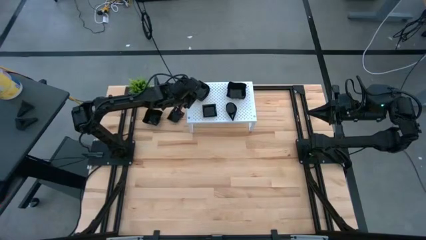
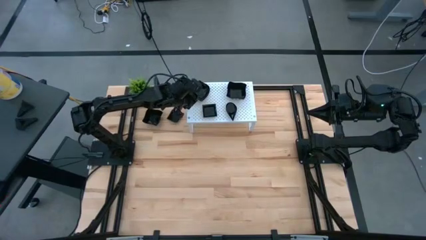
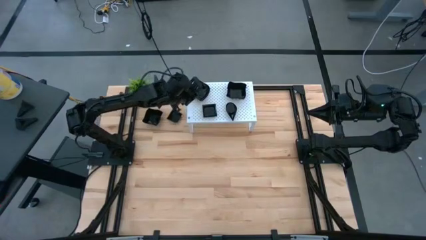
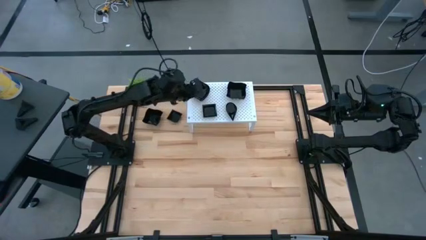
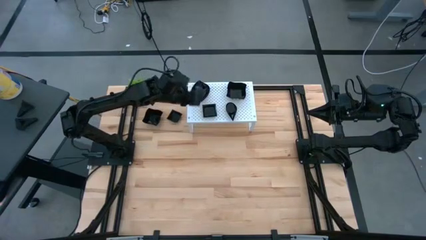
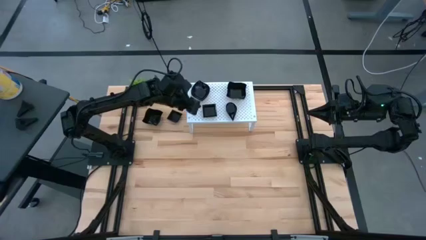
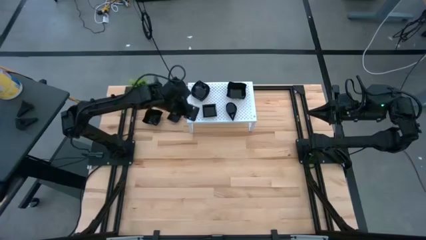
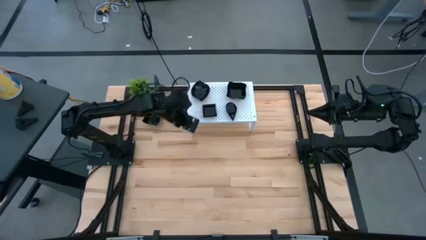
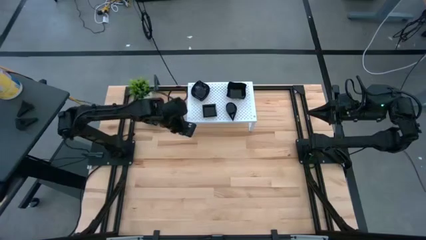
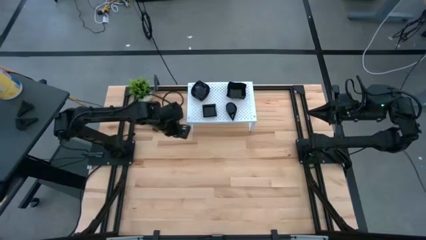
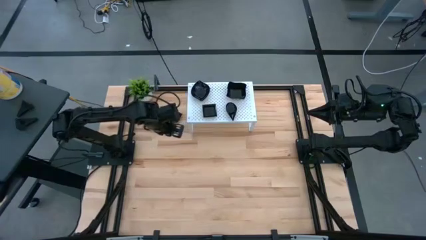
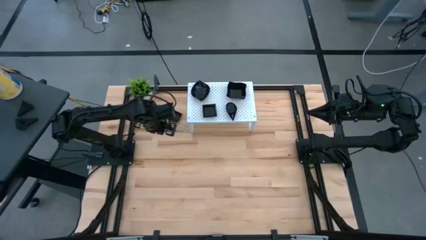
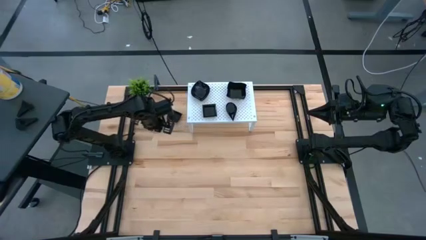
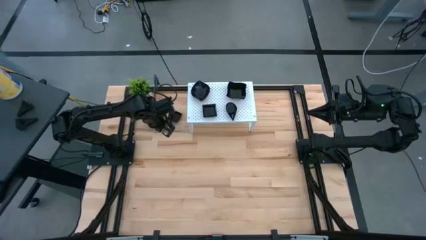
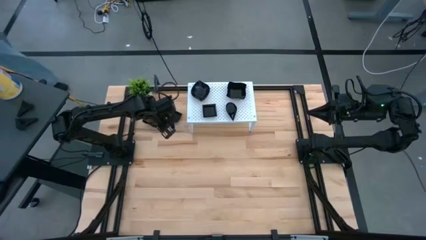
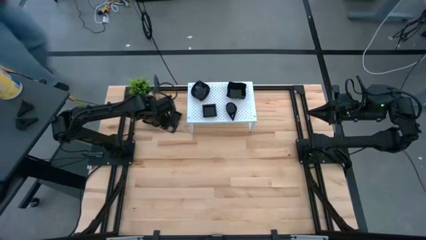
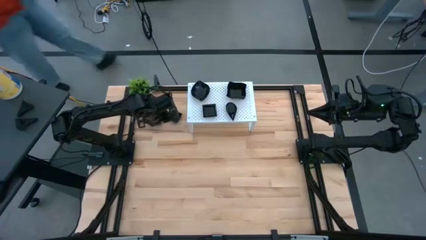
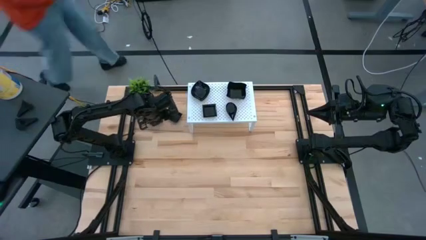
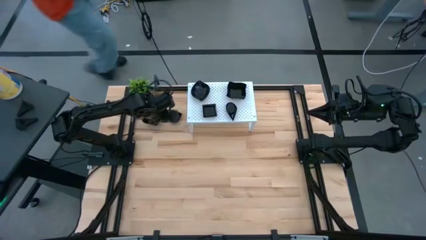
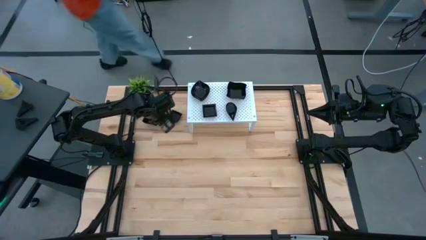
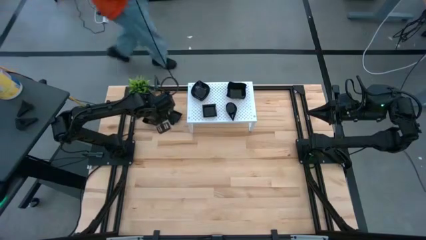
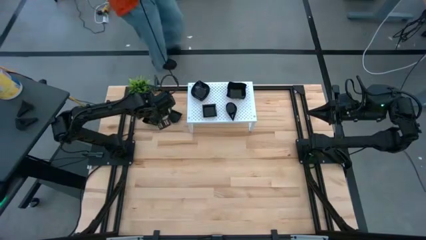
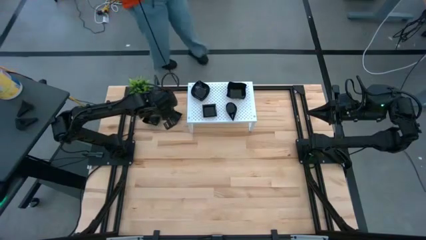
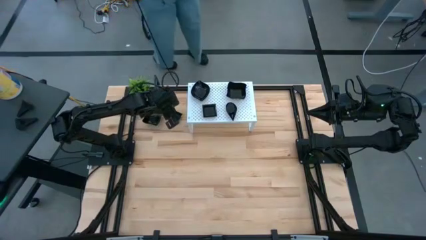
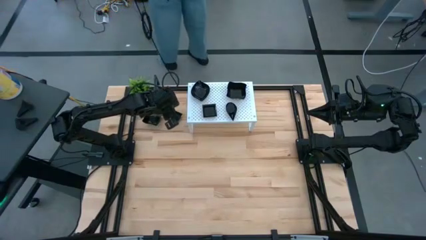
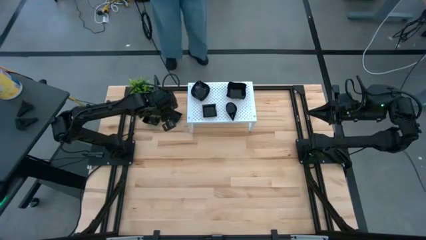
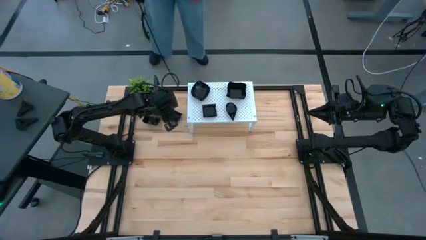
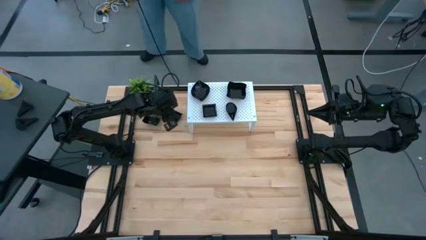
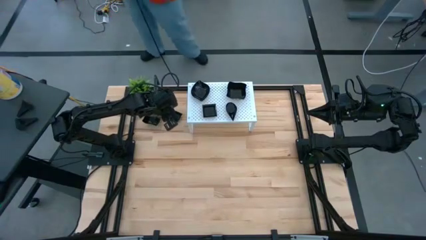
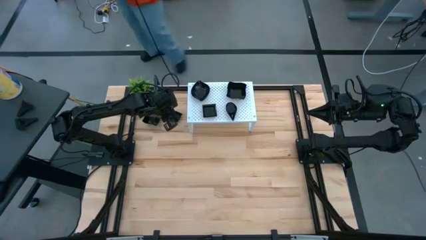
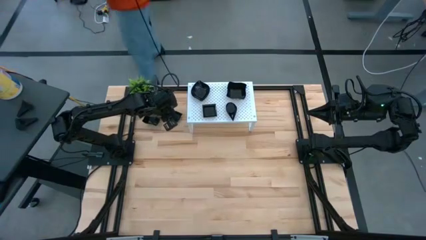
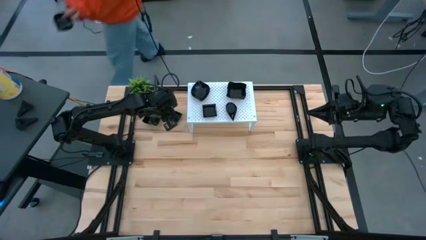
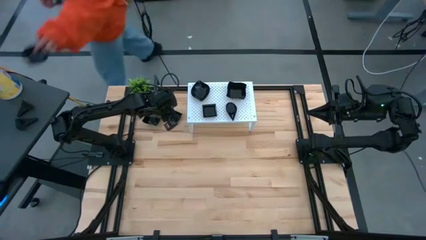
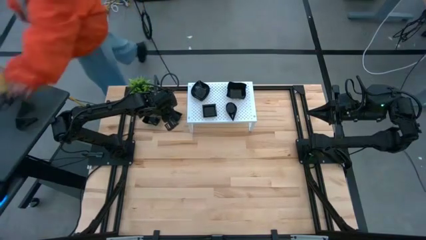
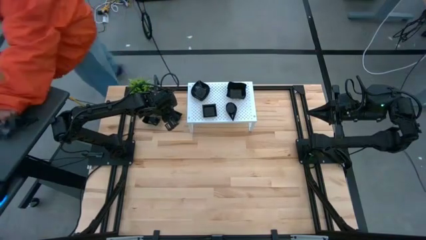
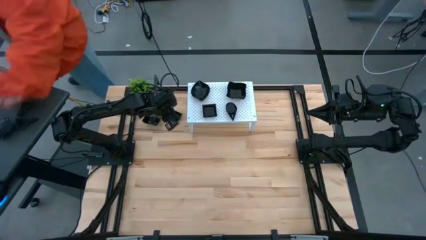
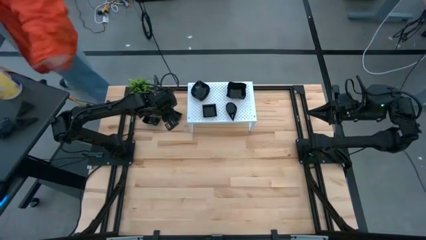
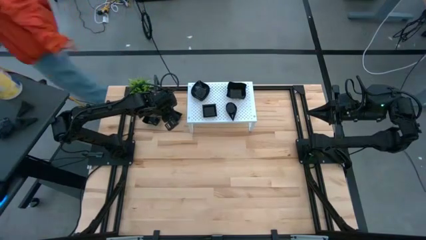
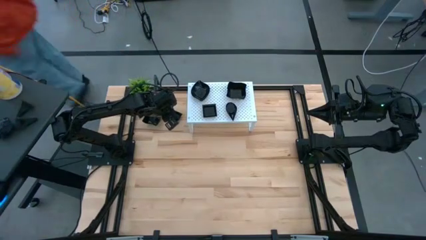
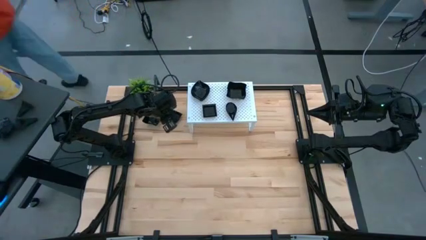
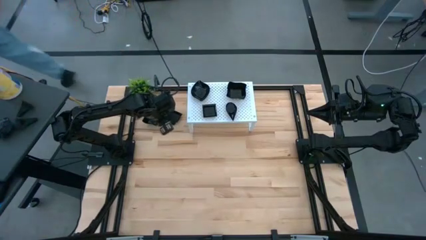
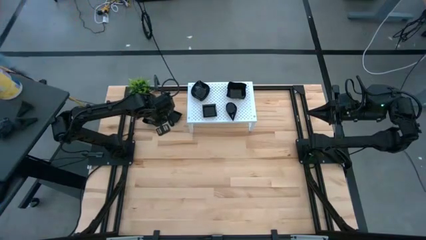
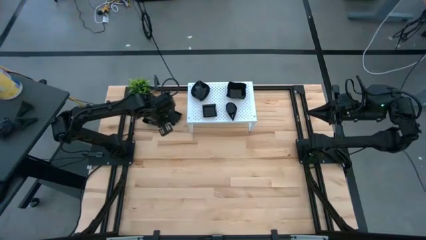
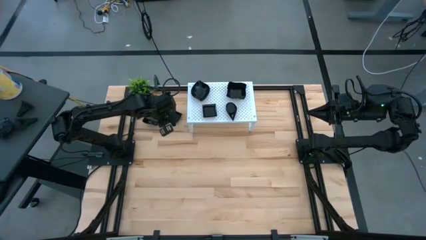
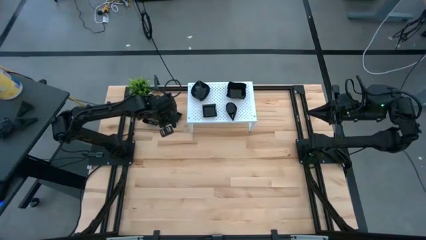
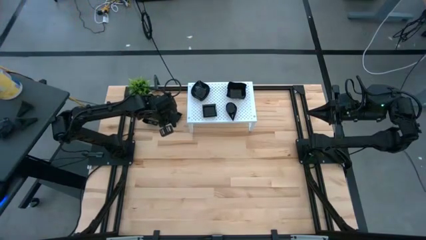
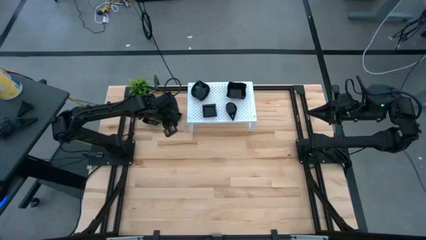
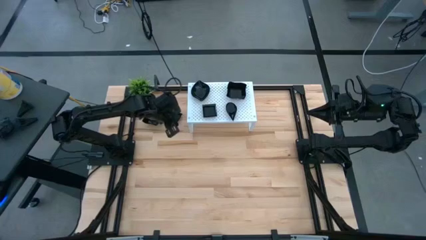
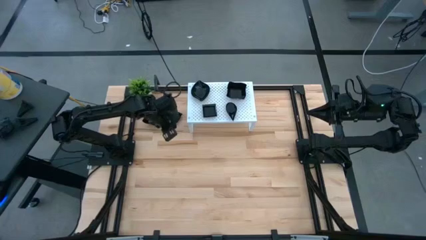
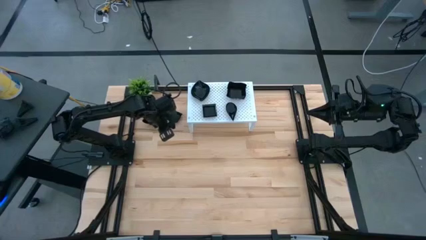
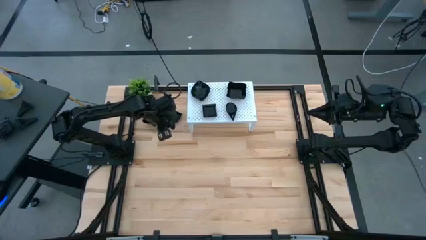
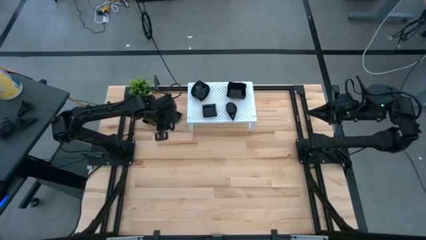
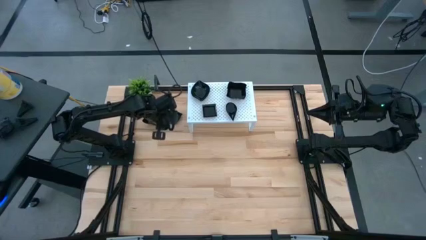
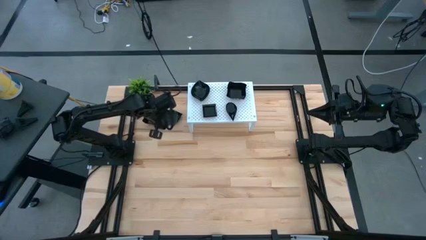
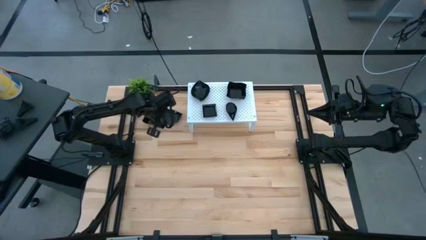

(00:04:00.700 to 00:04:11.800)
Task: Pick & Place Mini shaped plates
Stack the square plate on top of the square plate on the shelf

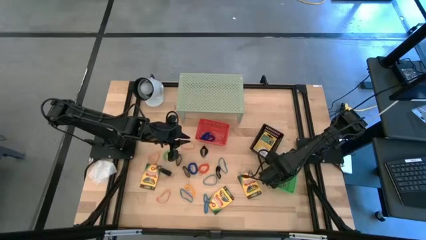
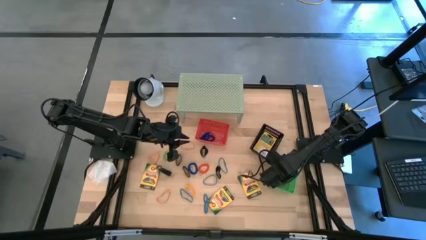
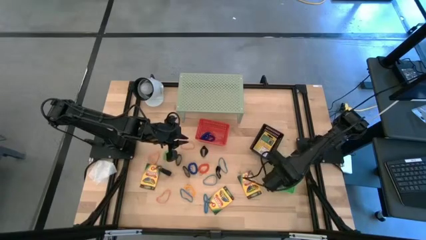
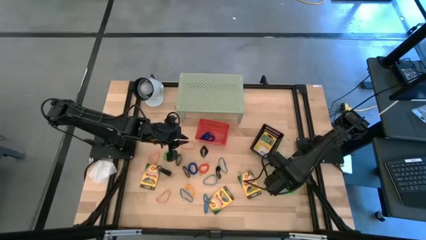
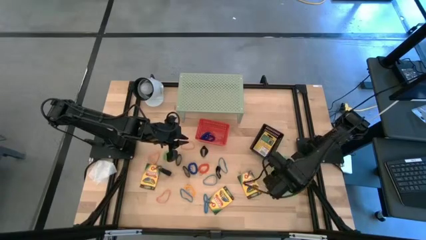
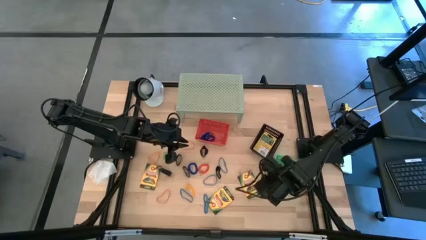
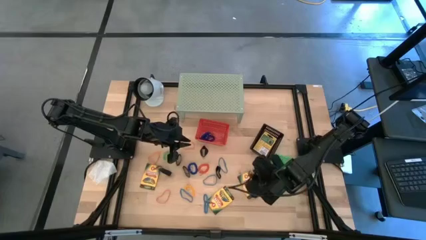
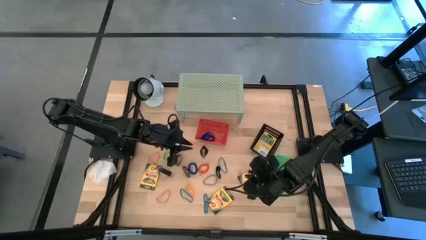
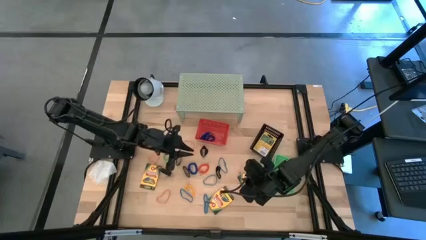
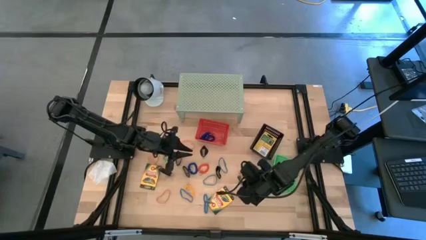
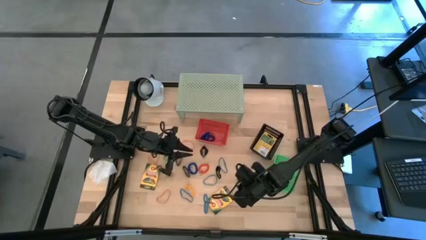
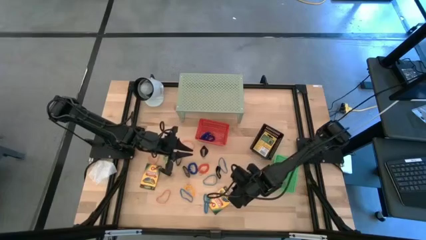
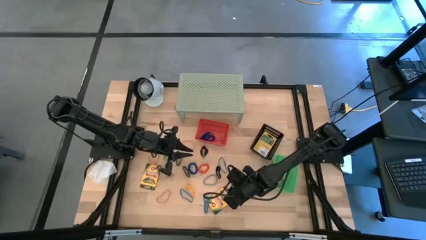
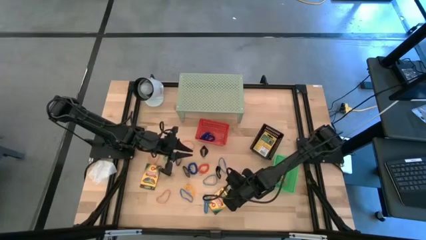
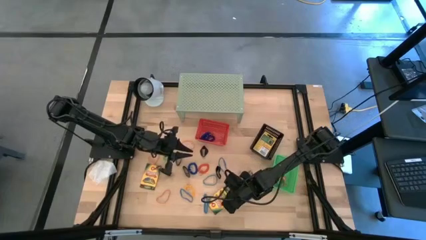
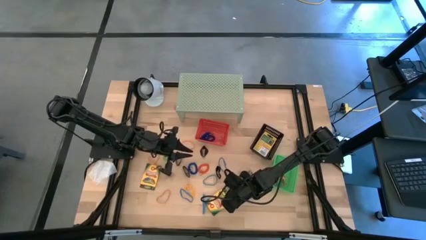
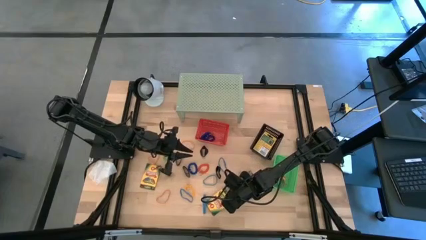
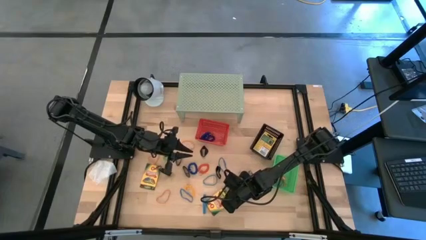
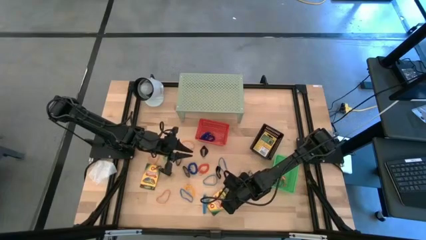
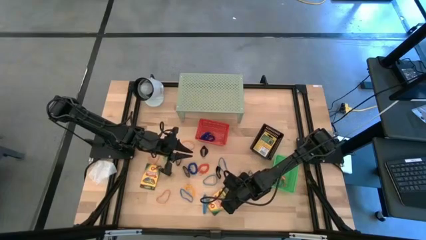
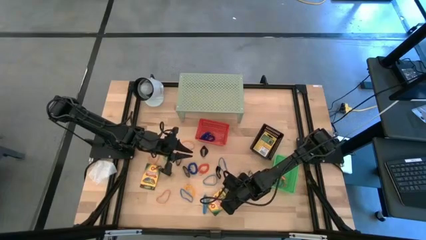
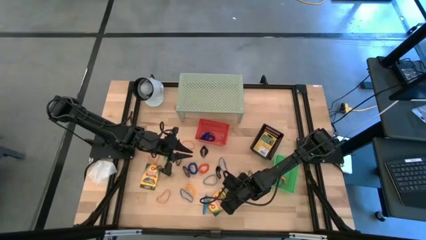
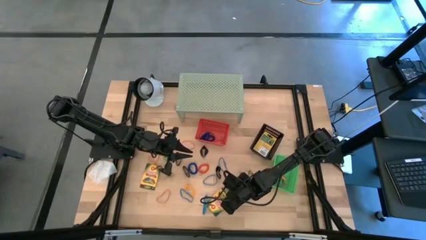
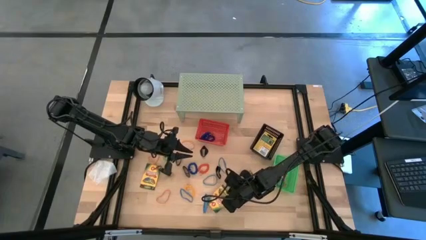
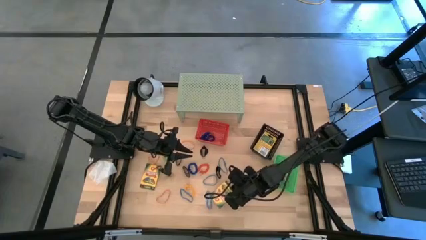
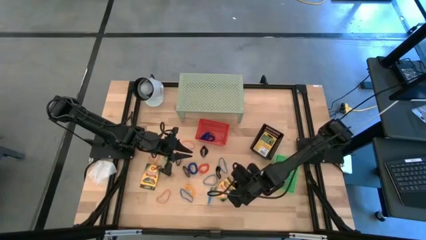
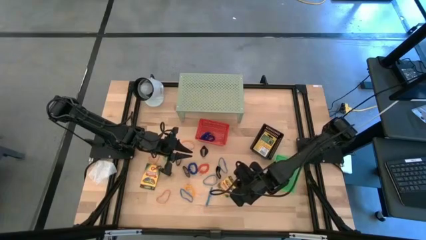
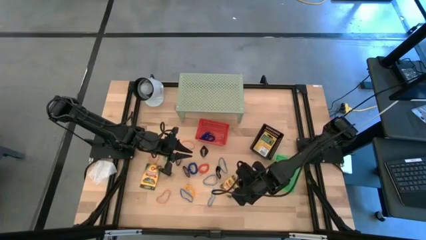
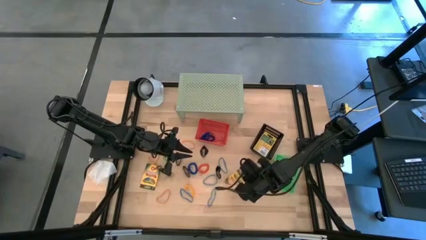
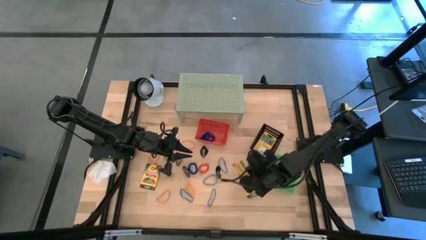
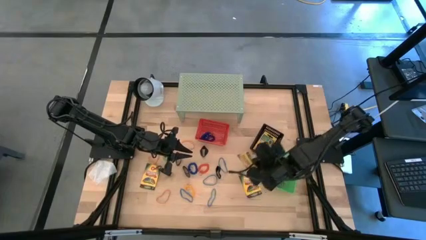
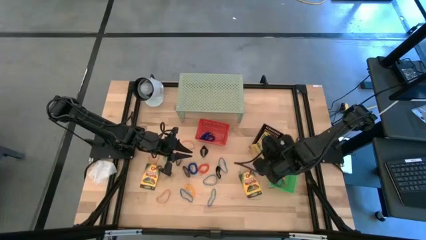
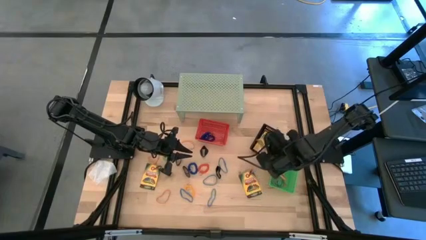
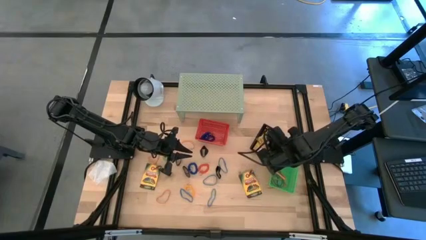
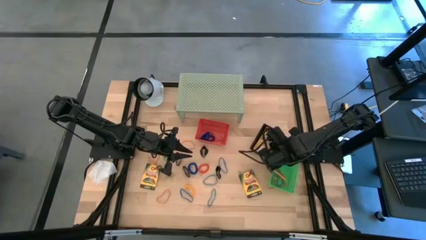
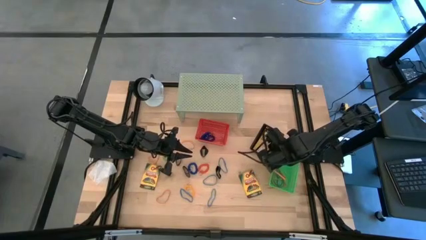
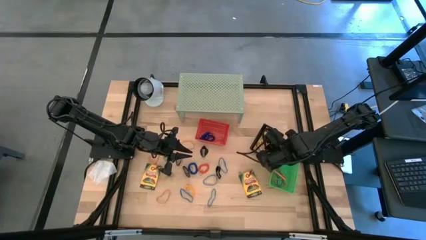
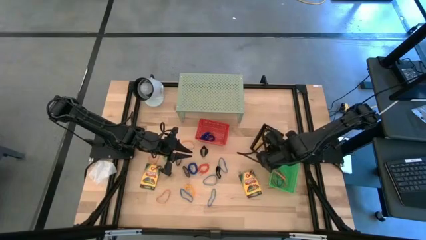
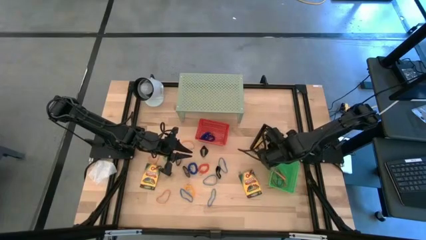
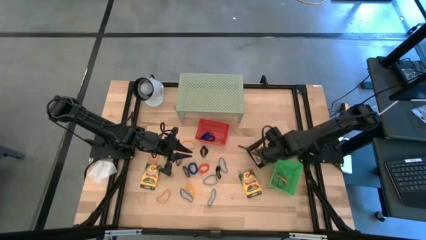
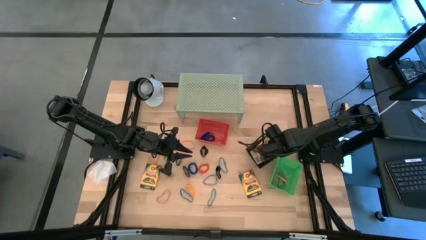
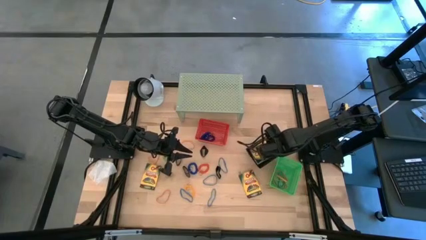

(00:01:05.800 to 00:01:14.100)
Task: Pick & Place Office Desk Supplies
Put the crayon box into the black bin
